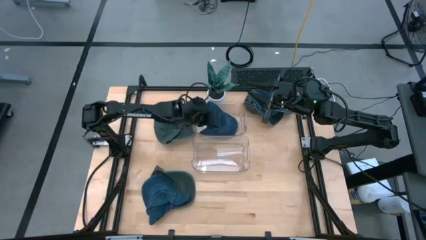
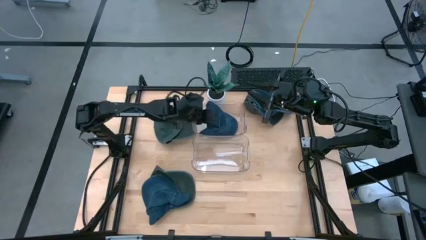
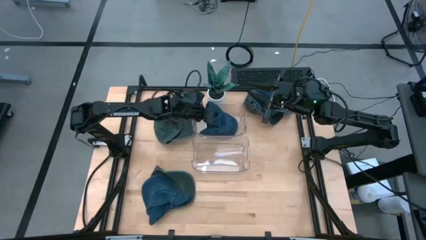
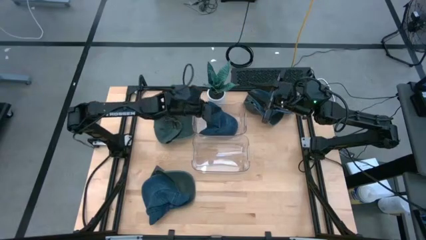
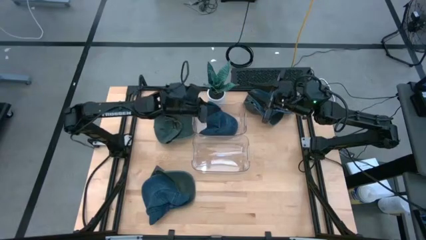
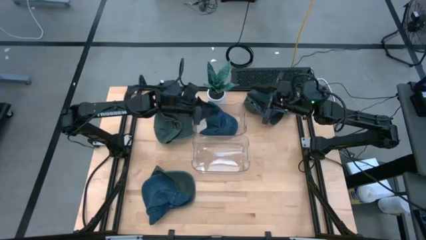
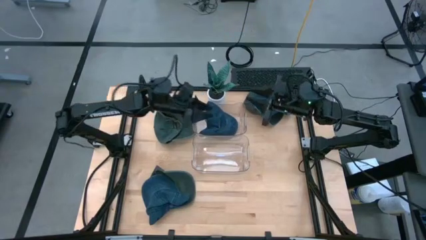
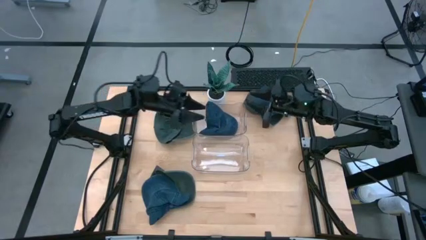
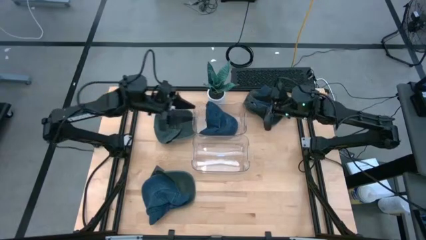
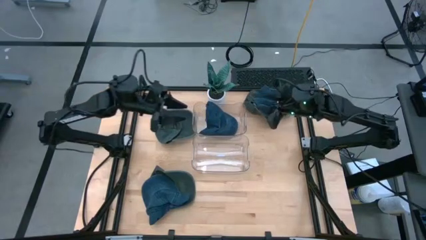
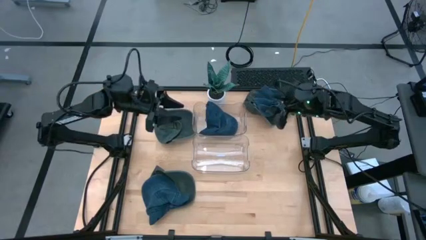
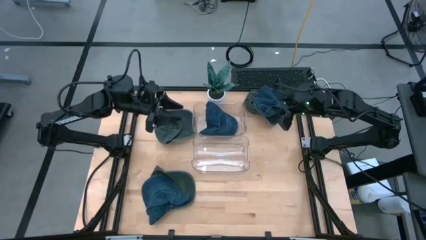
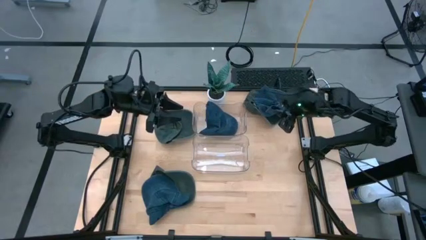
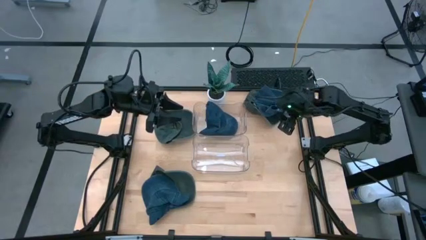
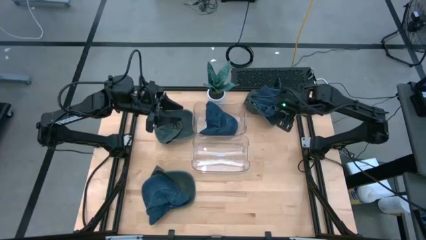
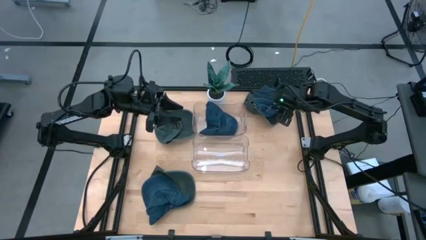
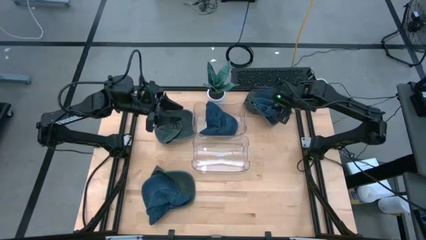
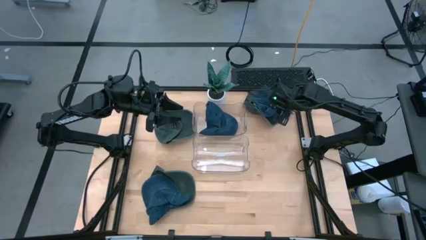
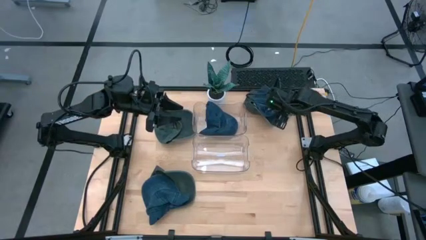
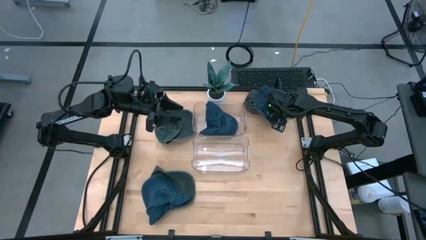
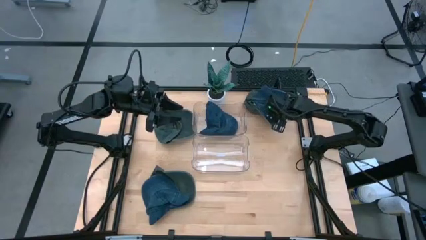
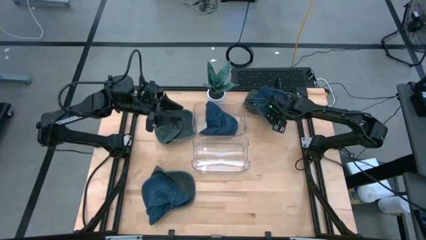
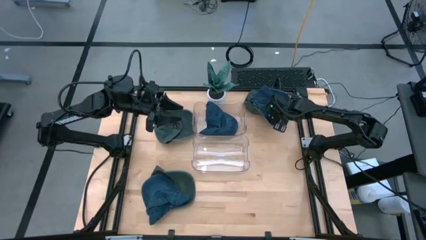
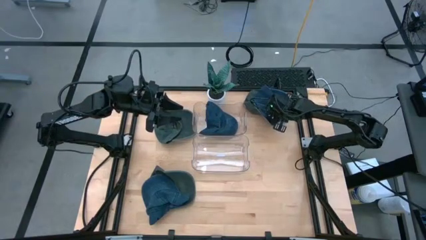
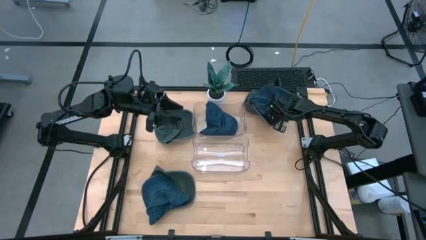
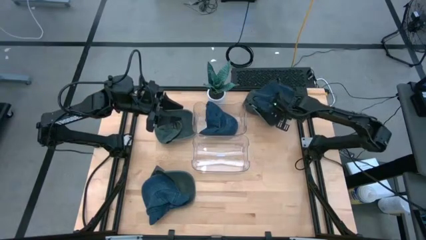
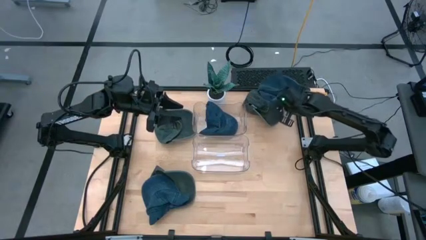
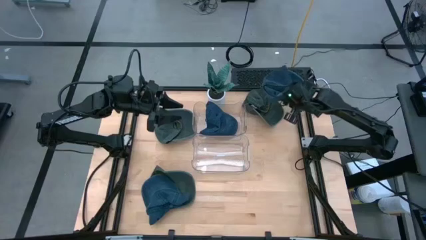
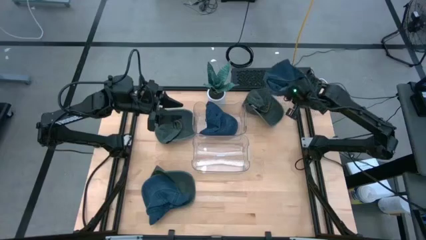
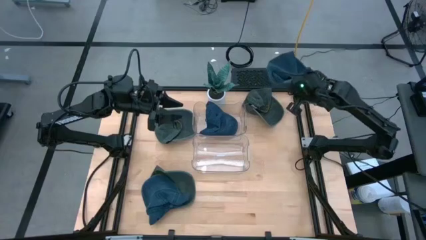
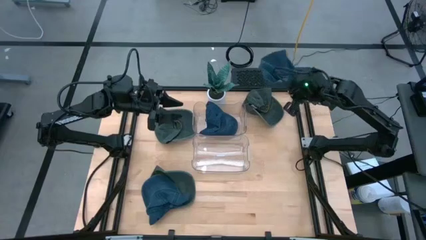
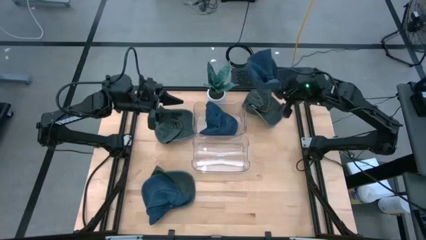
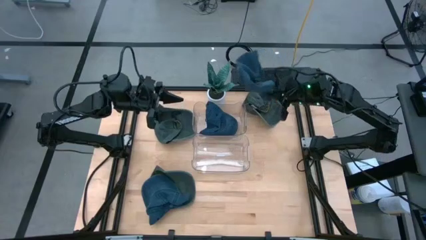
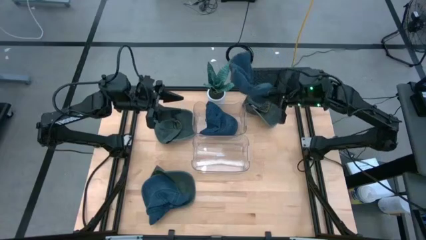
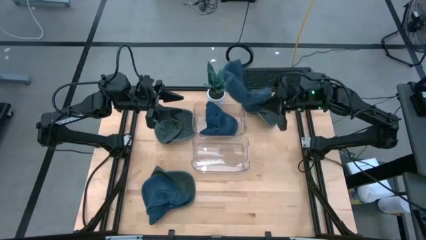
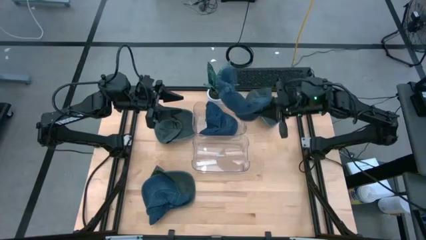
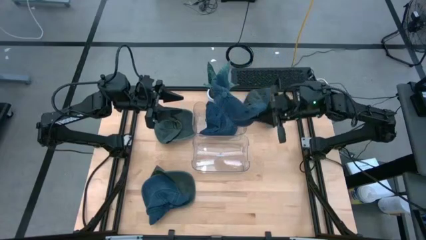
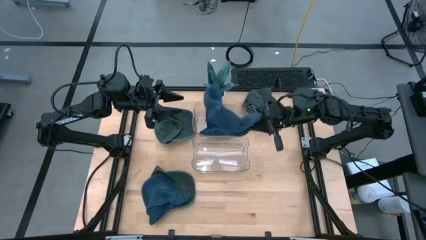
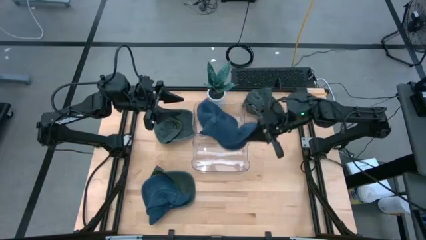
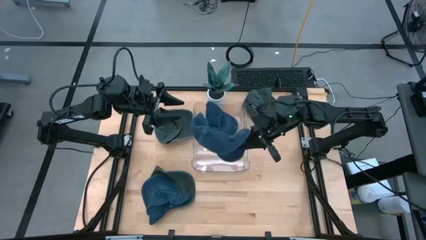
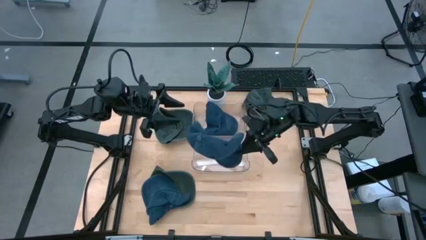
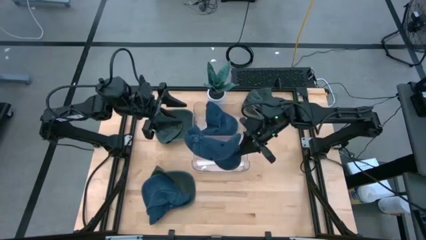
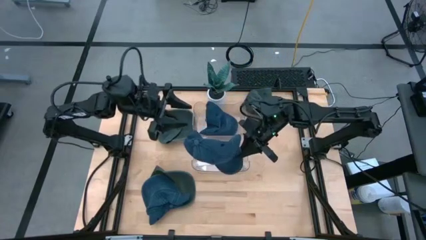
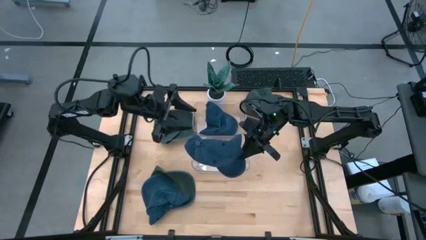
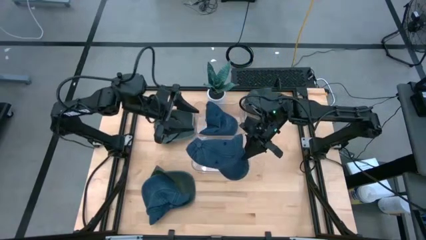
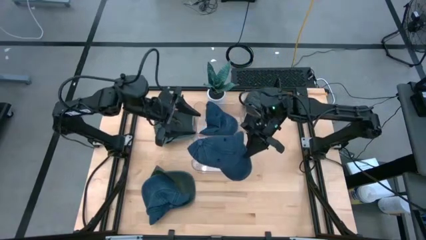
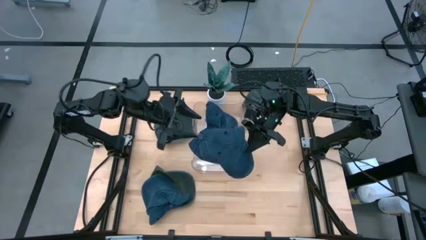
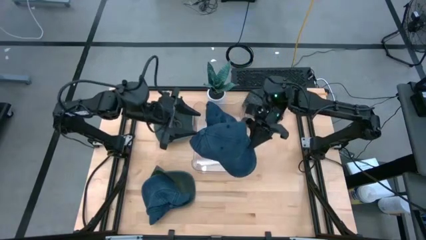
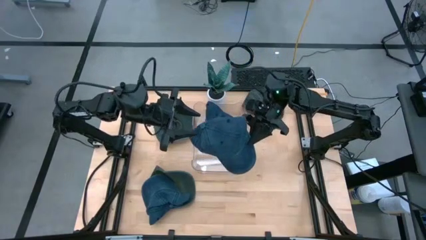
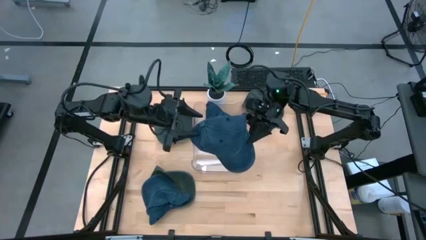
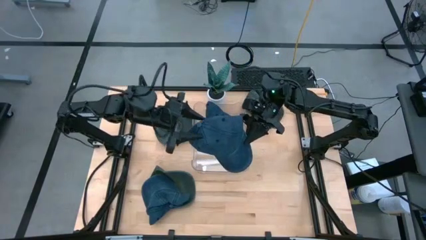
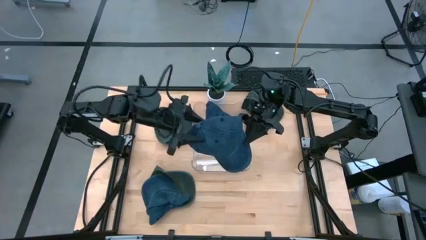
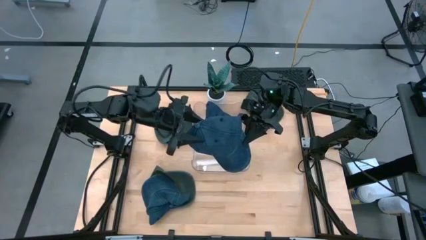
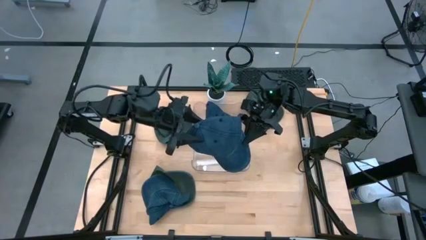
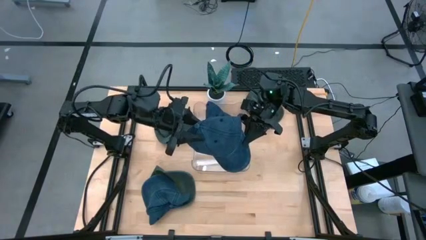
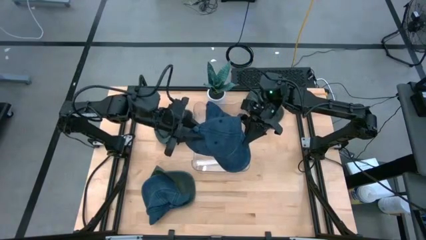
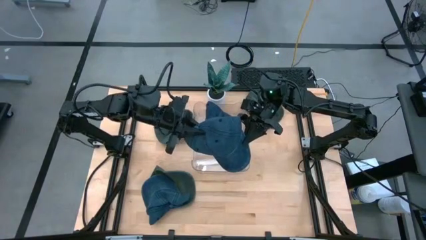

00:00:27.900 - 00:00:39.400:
Task: Pick & Place hat
Put the top blue cap into the top transparent bin

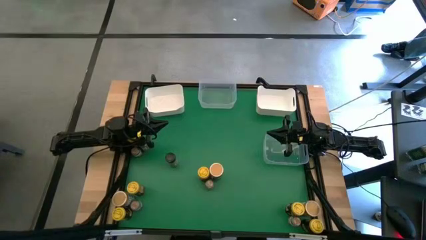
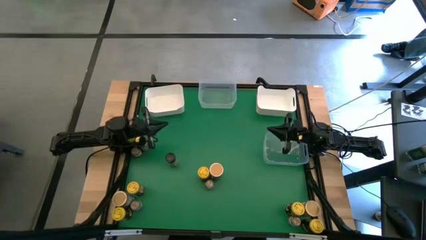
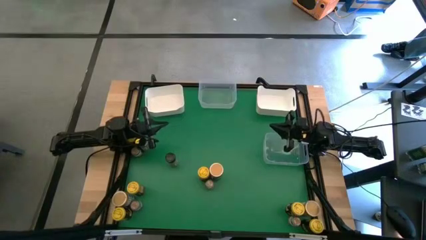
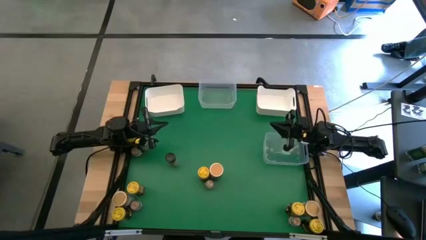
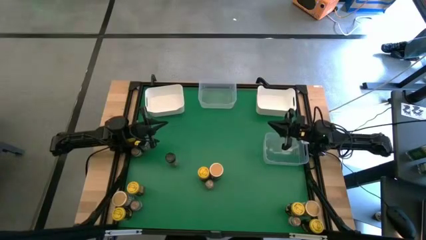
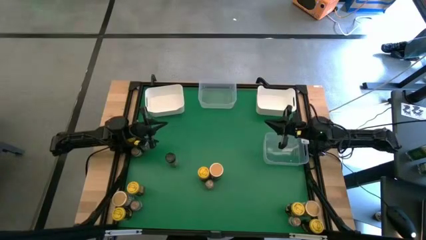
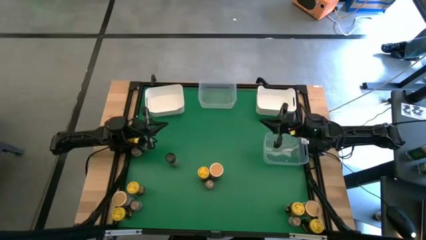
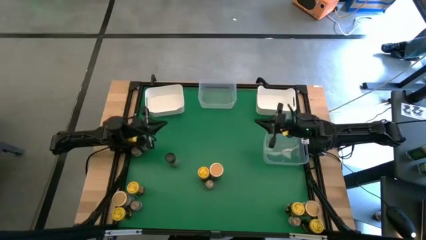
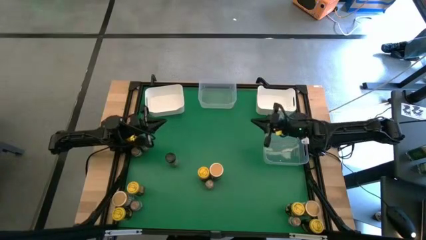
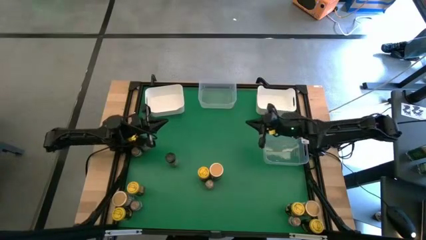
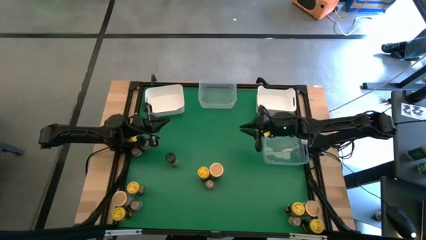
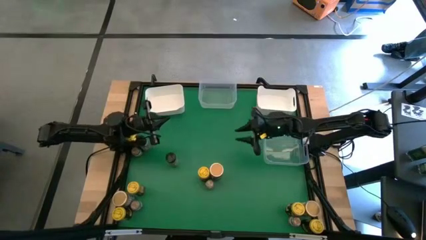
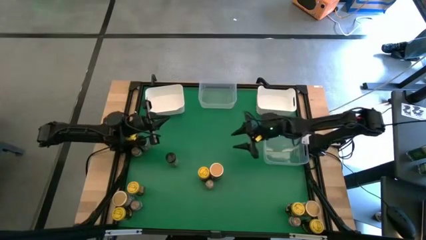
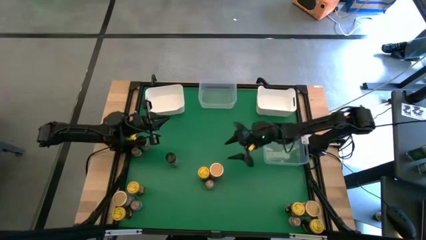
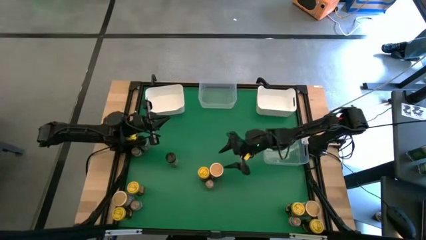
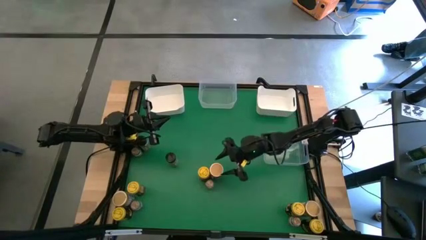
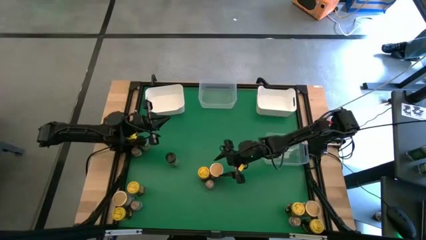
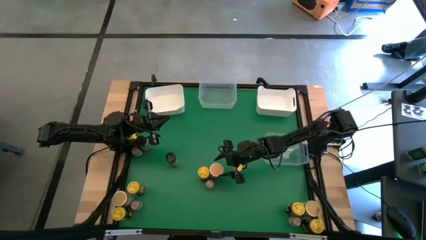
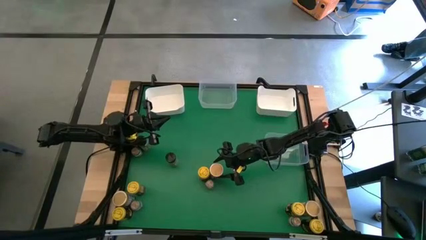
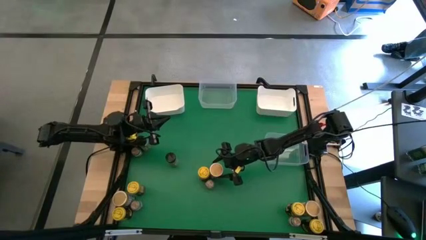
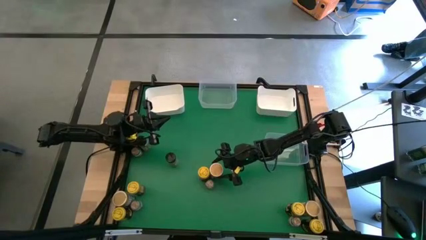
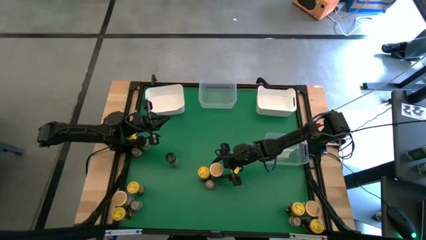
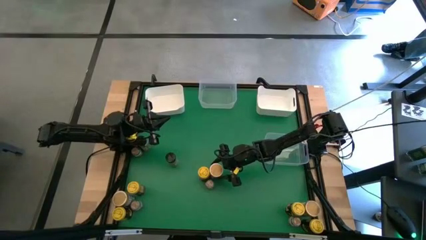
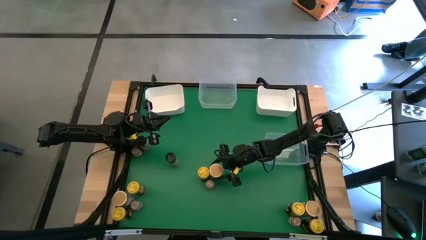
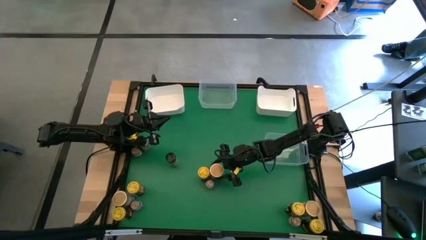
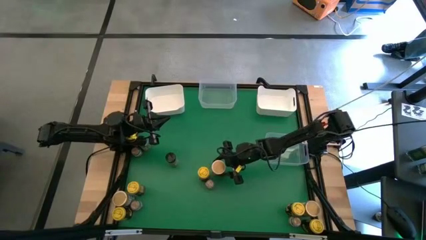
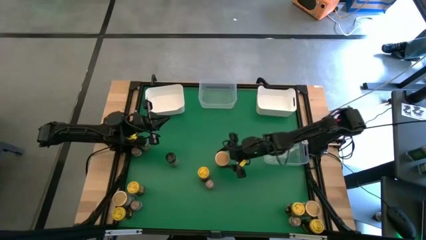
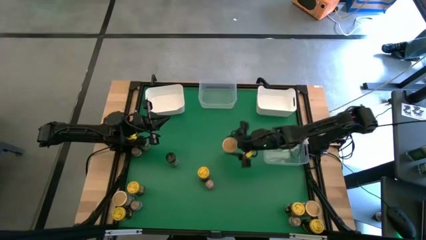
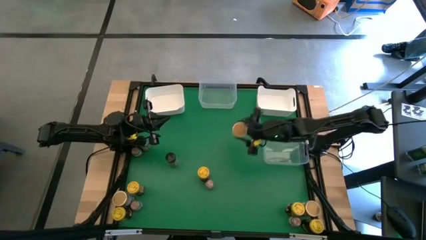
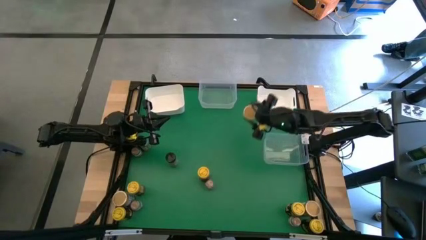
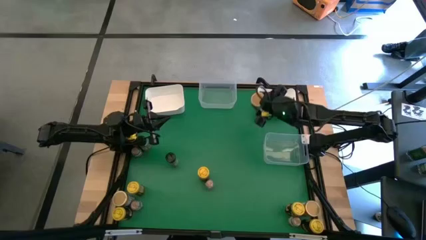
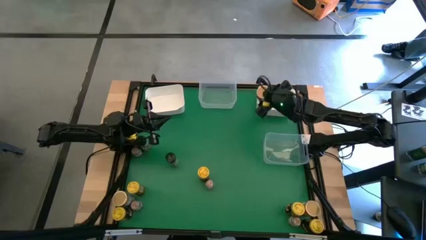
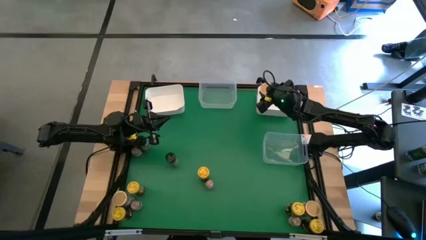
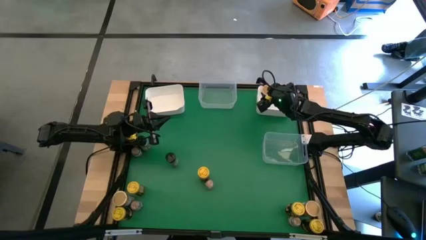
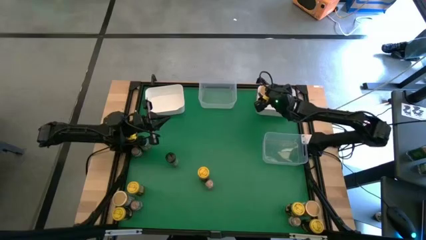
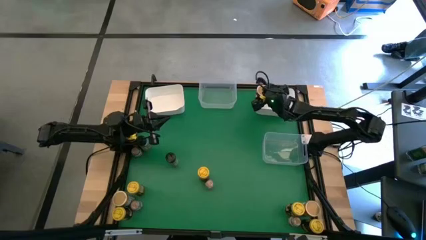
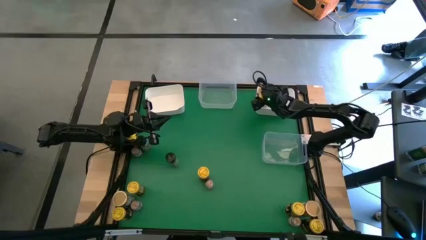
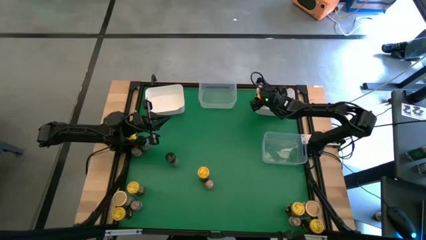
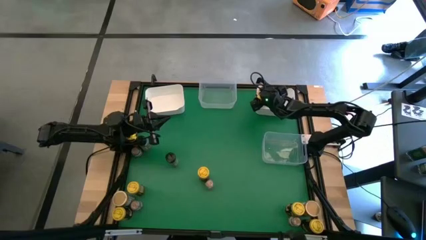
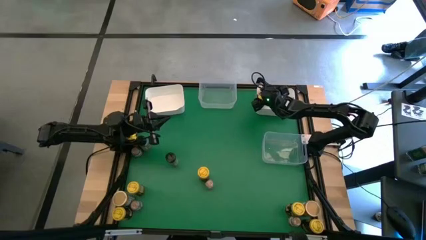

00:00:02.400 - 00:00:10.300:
Task: Sort spices by type
Put the brown seasoning bottle into the right white bin
